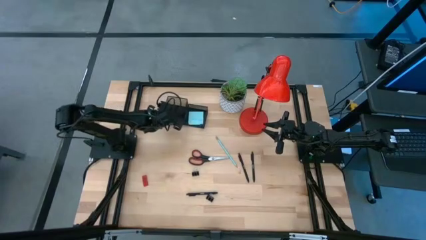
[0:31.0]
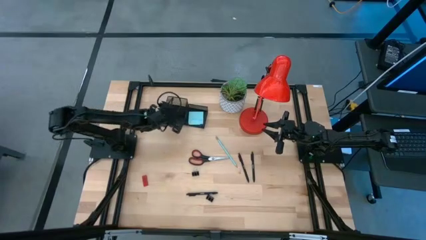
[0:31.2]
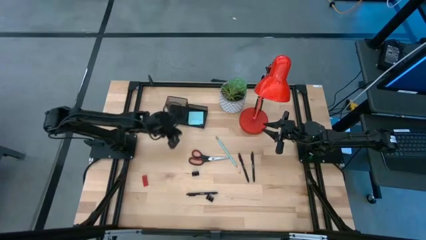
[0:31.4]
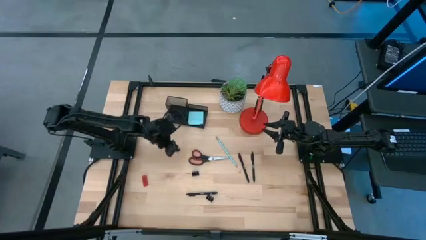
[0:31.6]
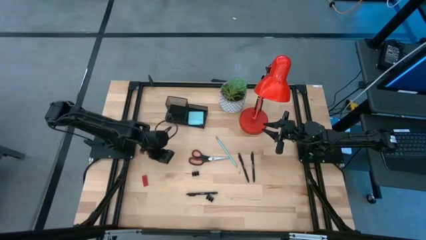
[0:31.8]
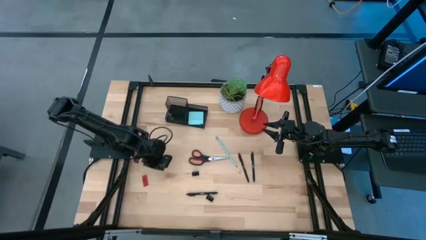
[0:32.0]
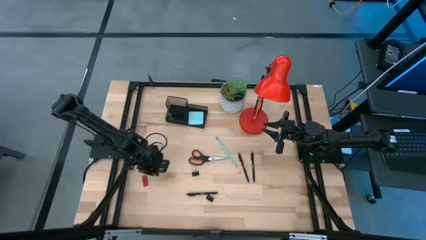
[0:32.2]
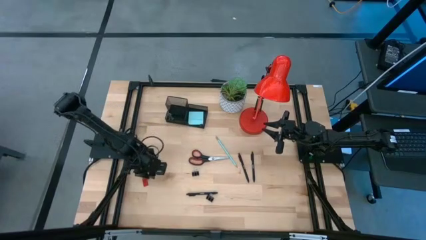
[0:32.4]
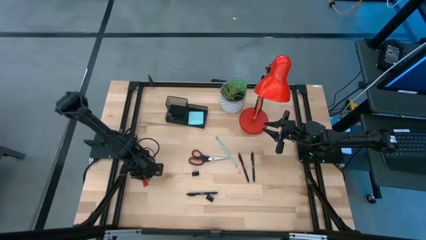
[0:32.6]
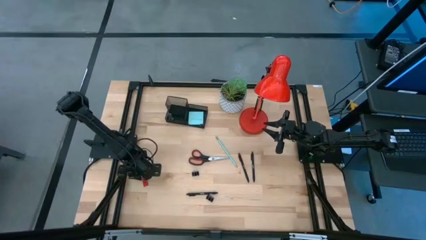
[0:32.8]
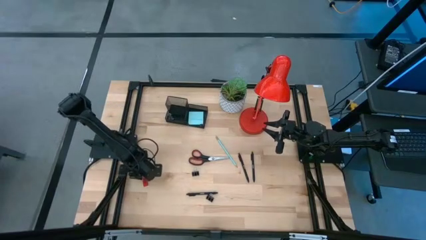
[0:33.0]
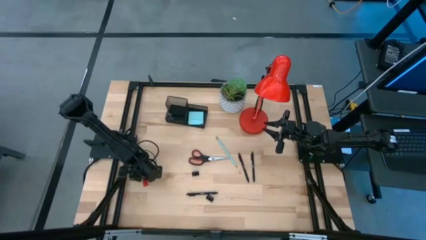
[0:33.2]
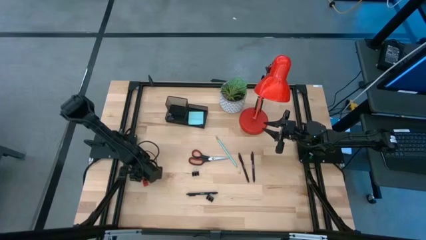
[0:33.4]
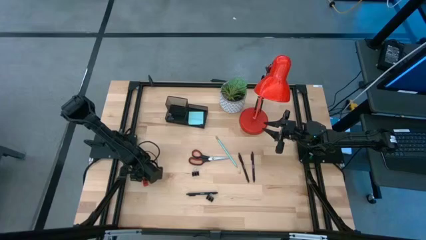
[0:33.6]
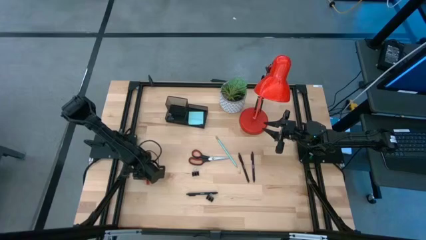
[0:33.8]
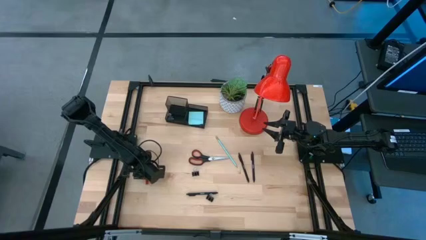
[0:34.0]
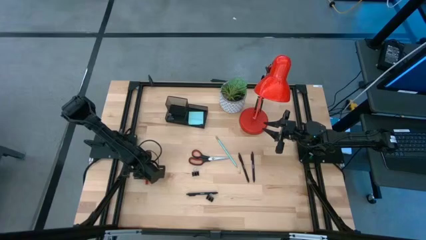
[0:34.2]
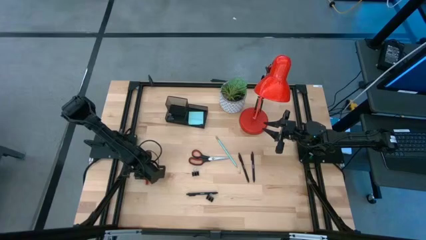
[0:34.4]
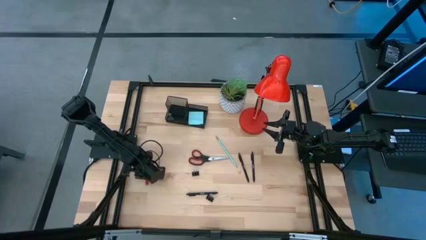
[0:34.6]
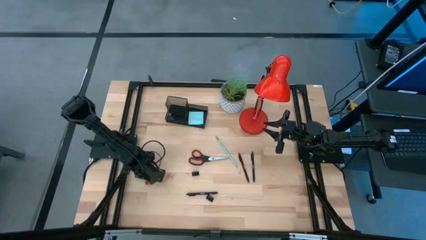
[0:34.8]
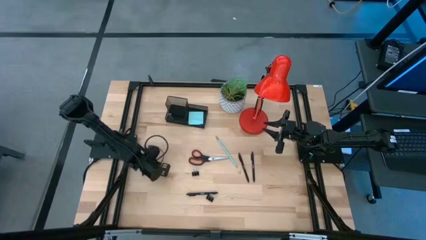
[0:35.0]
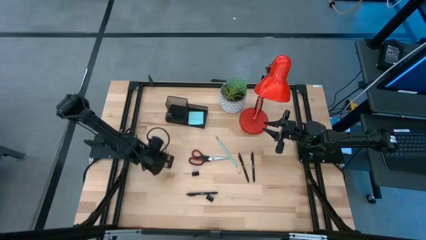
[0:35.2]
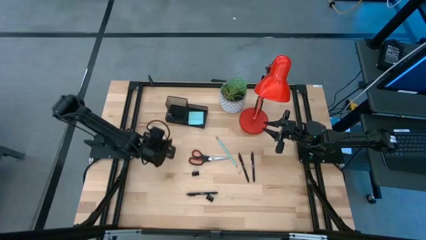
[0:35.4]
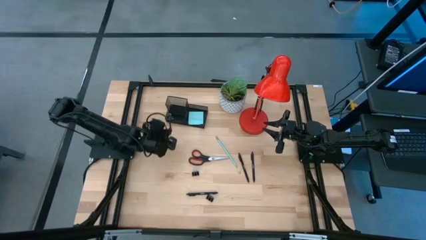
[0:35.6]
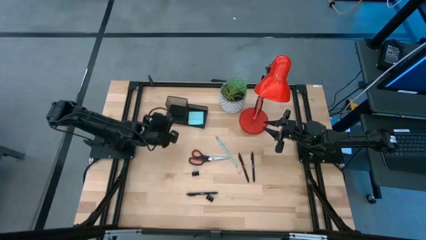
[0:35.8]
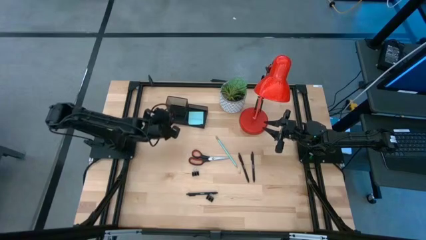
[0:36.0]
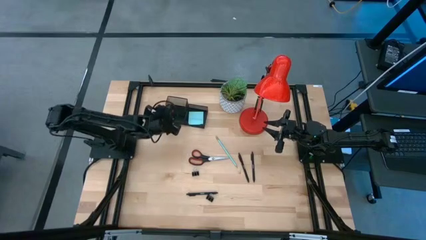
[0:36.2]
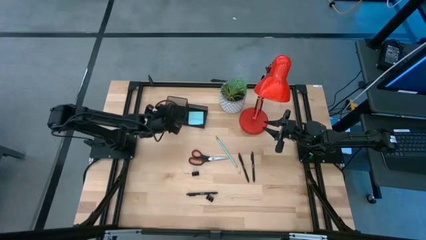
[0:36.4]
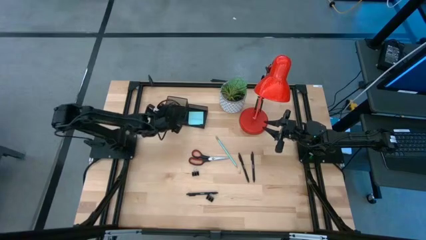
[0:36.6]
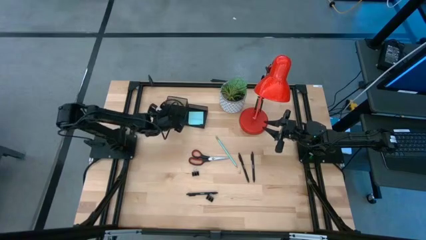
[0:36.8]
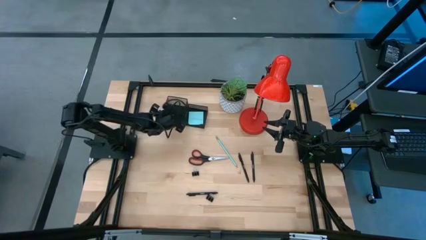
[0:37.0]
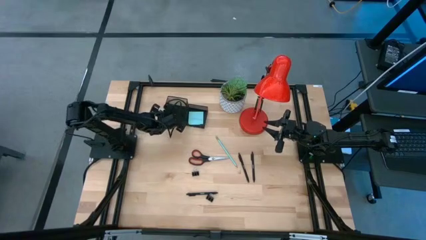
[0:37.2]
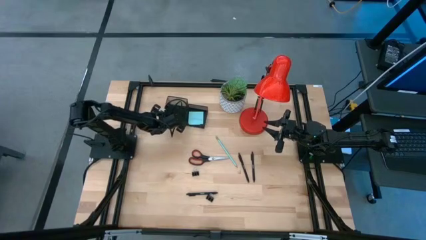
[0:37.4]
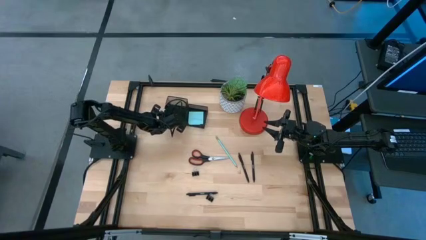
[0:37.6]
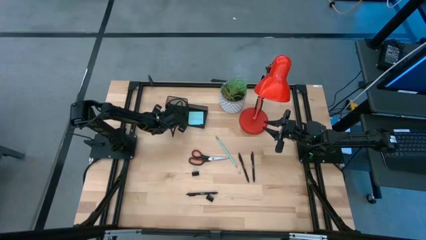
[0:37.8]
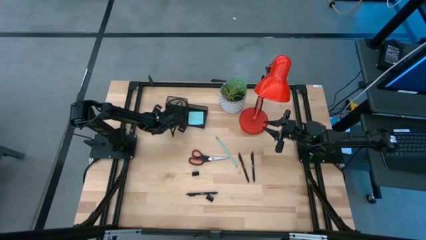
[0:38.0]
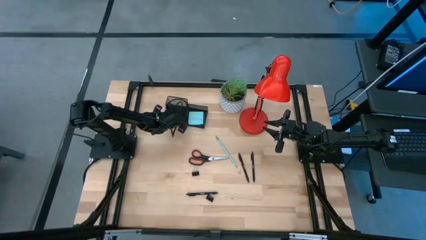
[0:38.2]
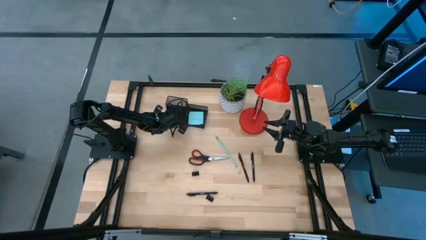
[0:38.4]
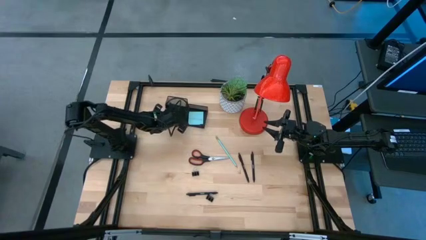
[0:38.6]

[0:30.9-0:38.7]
Task: Pick and place office supplies into organizer
Put the red eraser into the black desk organizer

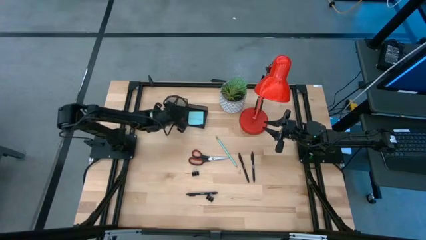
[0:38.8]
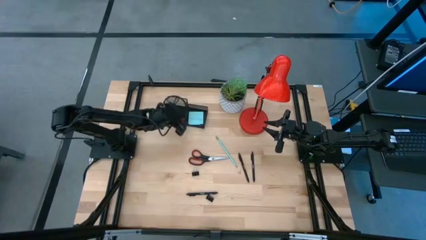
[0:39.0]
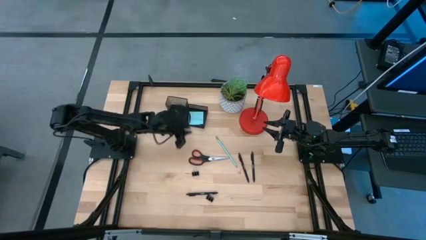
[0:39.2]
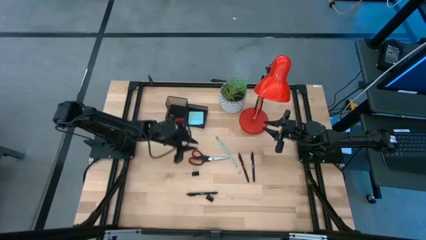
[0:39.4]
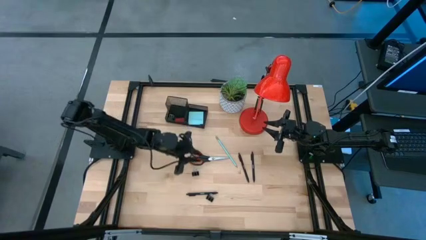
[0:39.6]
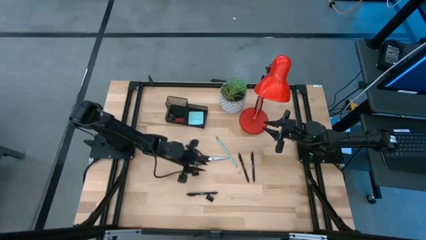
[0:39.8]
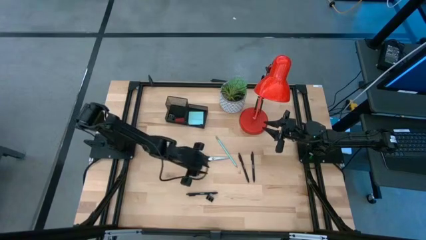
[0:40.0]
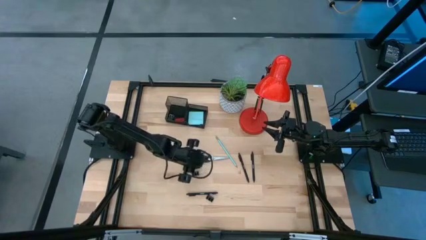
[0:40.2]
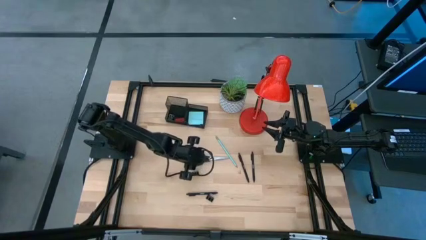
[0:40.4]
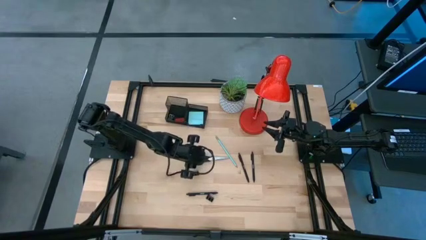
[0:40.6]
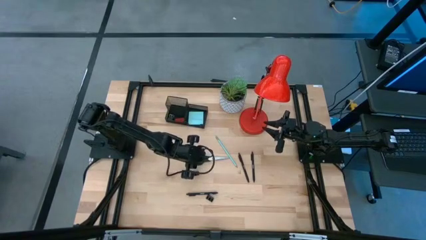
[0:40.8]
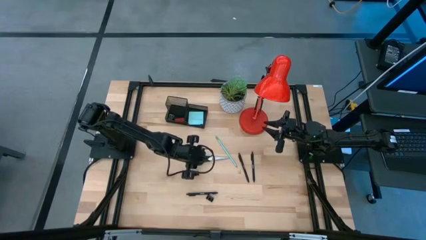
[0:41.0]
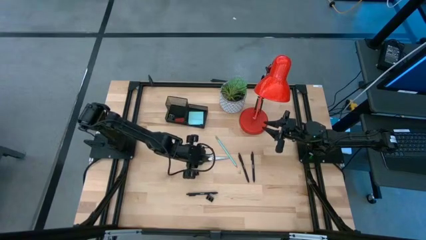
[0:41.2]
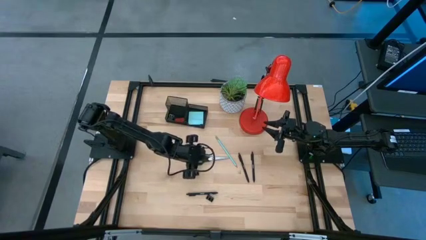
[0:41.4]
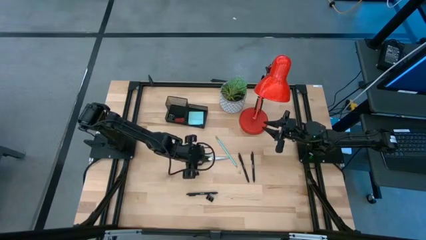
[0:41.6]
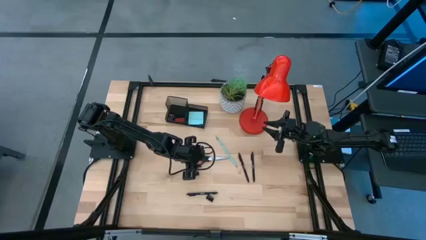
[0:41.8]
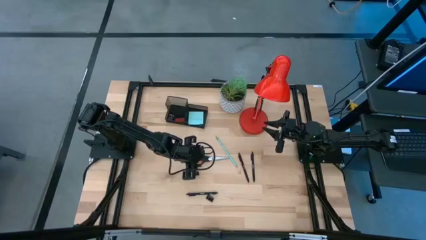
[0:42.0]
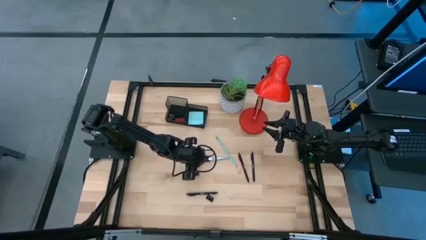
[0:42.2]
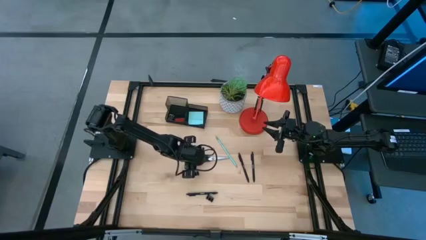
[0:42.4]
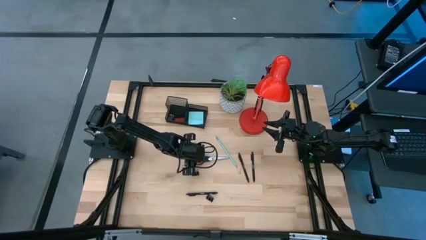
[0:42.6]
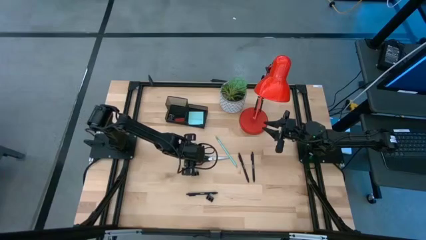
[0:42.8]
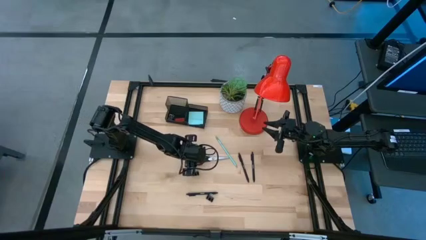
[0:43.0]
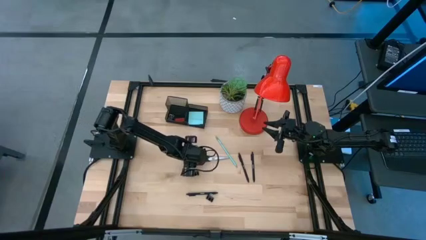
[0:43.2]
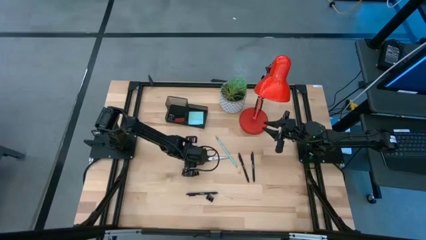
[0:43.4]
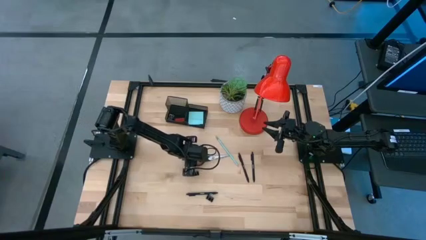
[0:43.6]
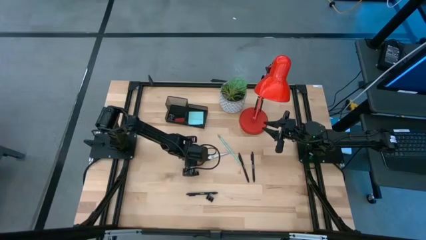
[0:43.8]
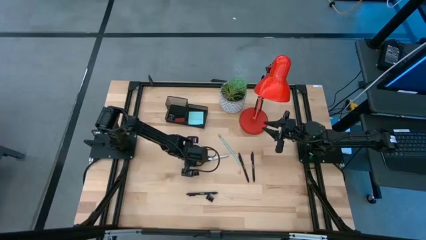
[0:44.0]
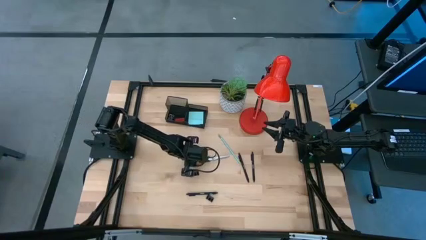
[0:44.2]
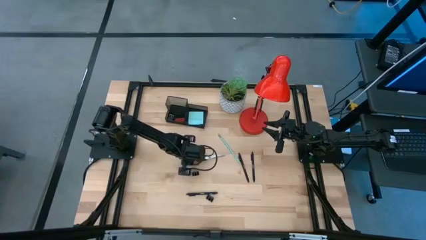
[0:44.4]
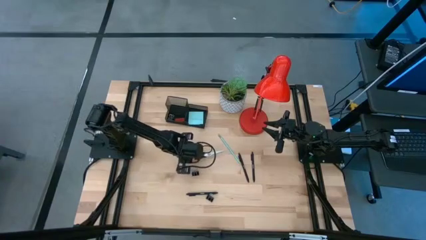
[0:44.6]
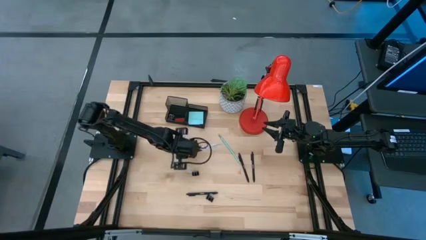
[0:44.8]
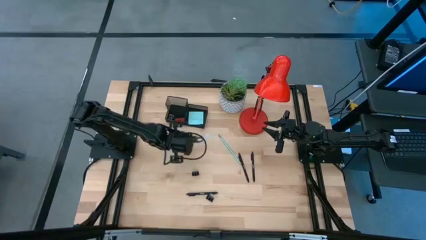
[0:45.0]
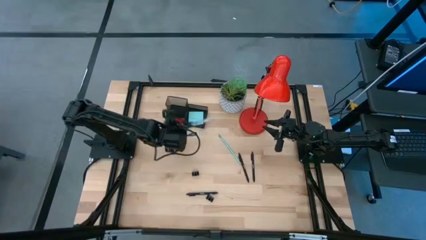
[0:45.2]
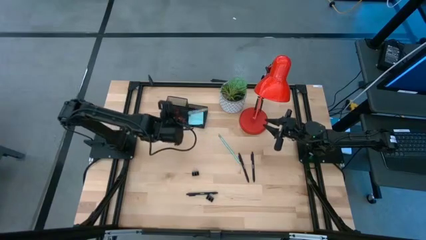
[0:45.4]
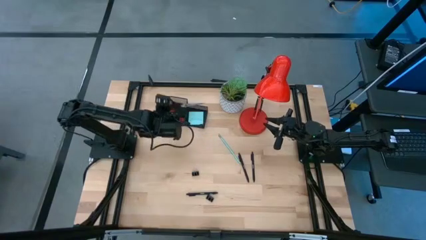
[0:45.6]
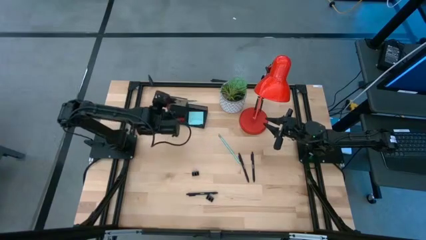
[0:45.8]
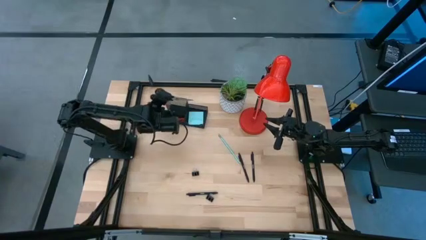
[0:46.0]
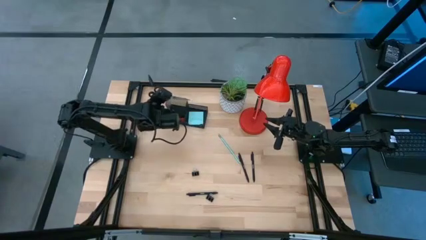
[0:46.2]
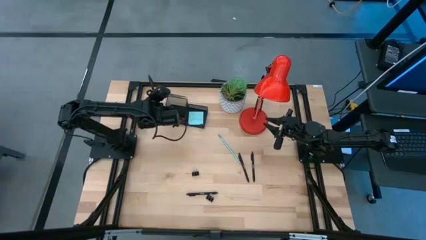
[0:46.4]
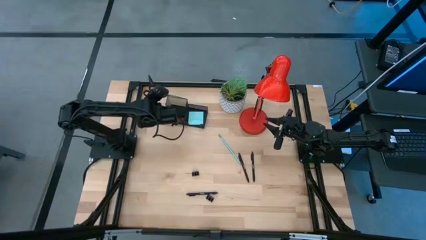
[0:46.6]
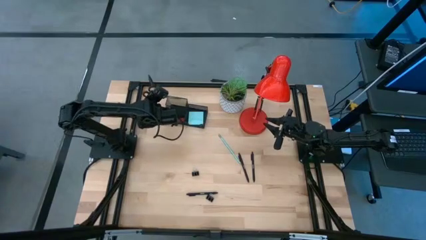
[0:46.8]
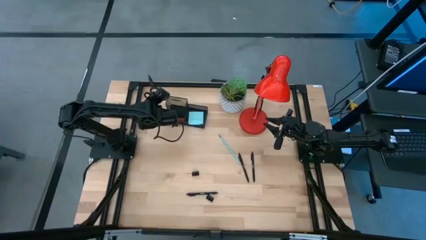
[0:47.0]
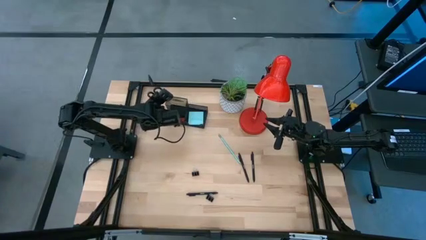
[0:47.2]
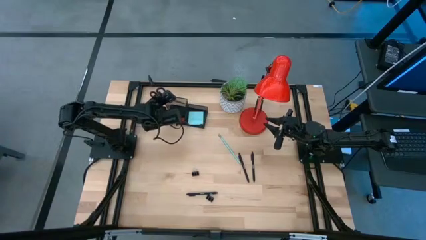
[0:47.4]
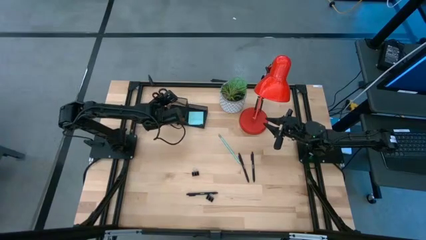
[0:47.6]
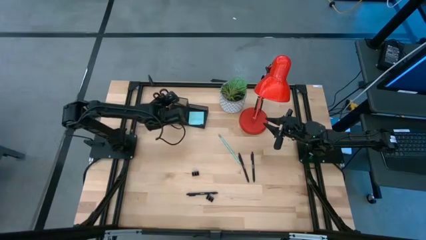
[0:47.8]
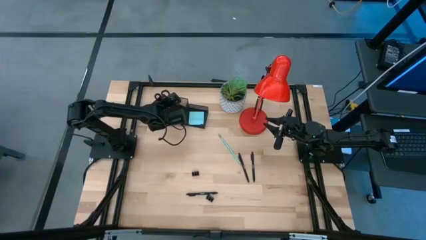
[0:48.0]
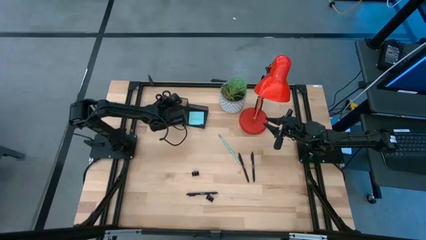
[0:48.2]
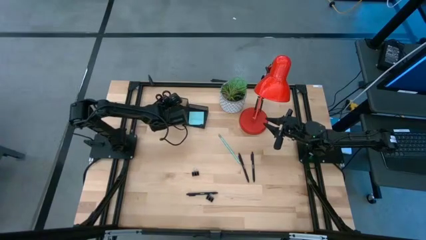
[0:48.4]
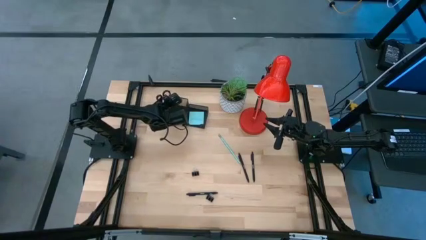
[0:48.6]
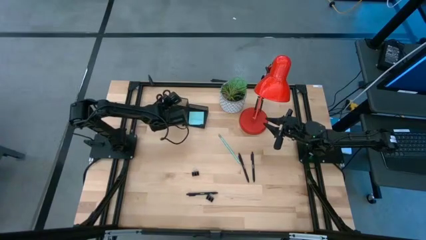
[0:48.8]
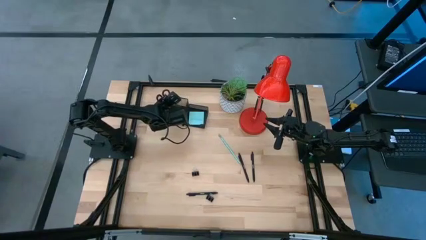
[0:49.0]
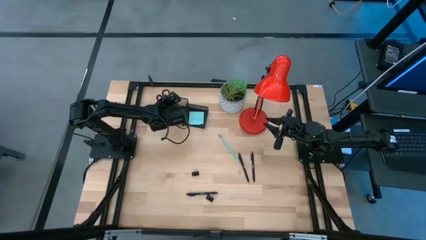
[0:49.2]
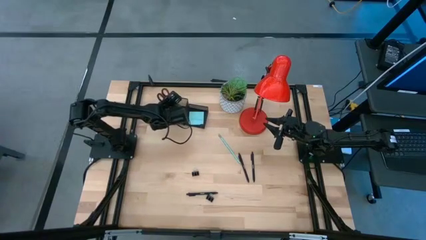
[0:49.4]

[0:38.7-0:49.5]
Put the black scissor into the black desk organizer
